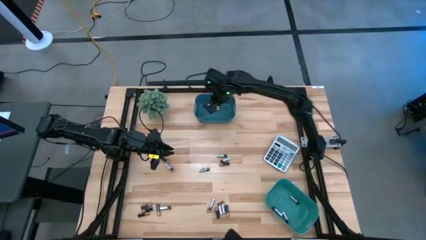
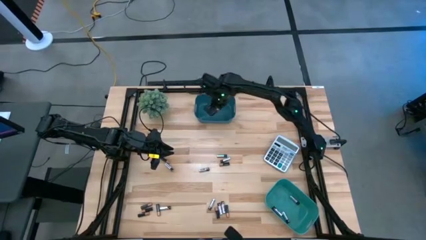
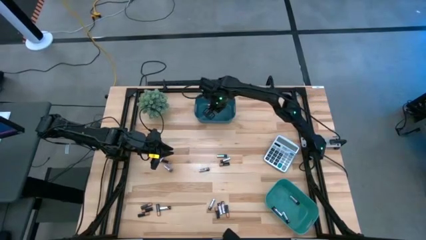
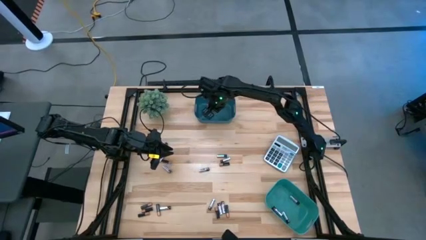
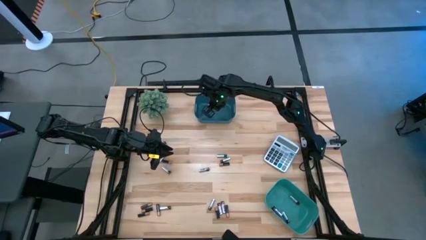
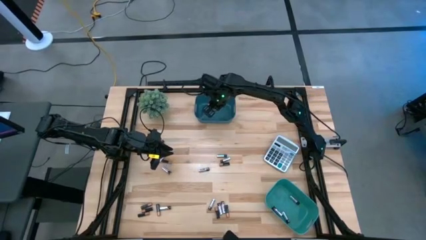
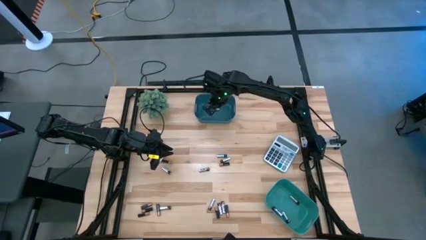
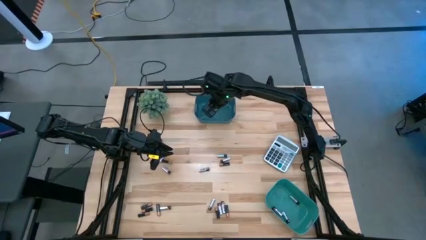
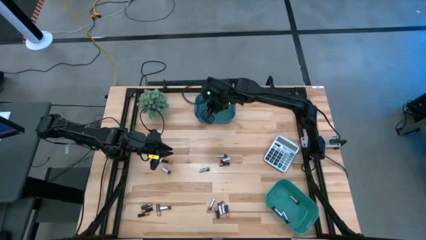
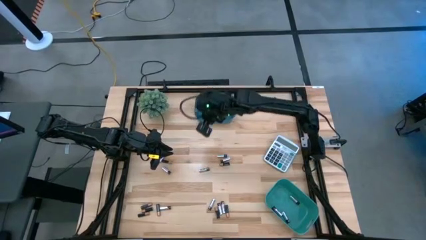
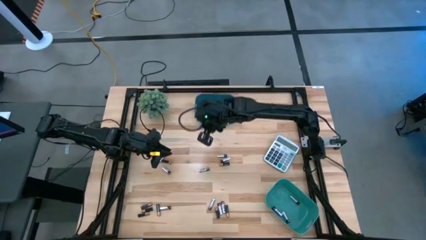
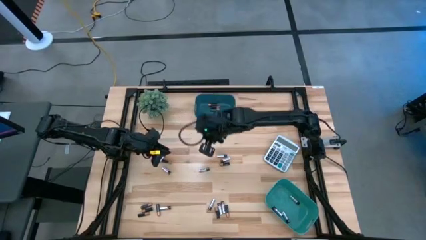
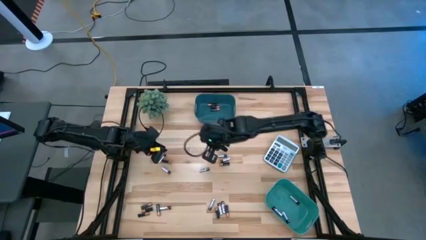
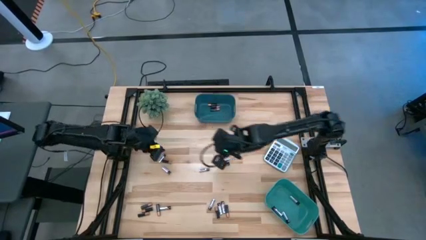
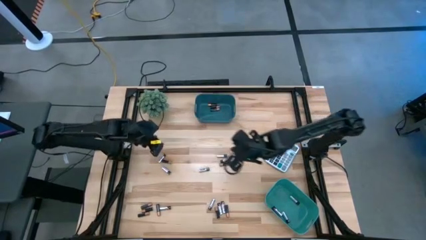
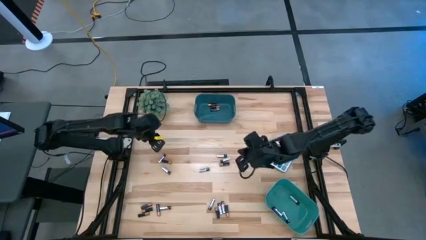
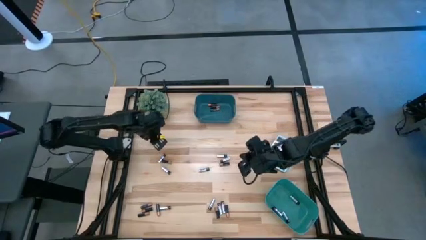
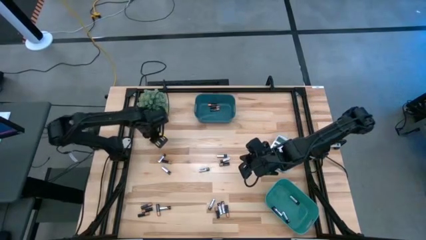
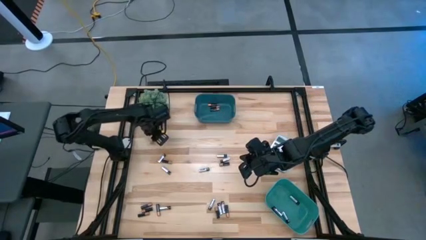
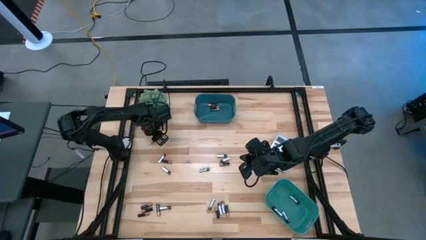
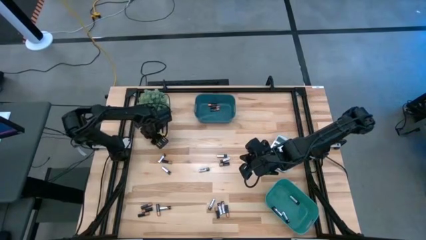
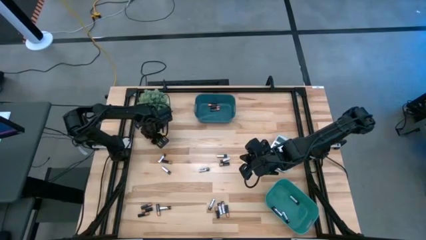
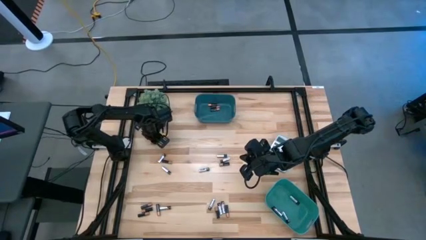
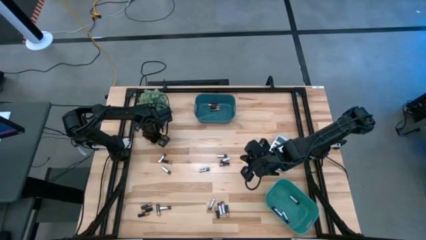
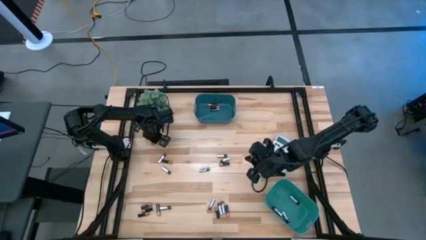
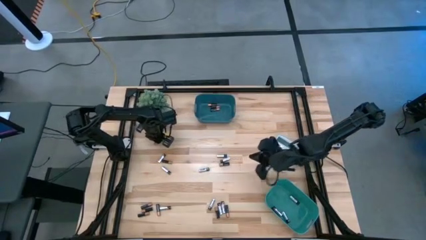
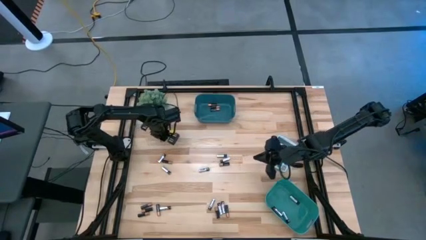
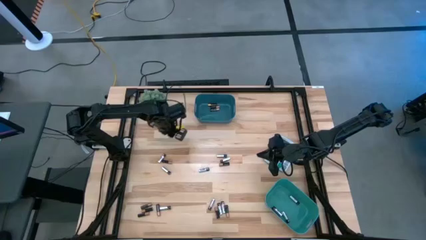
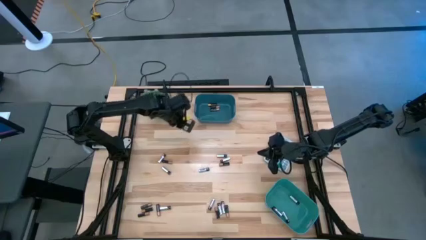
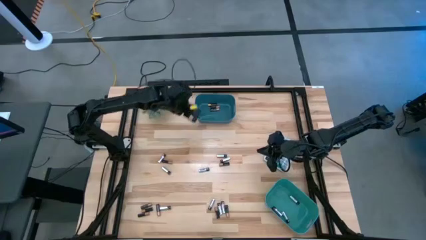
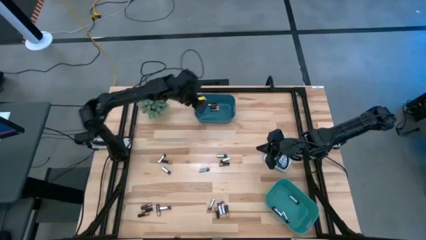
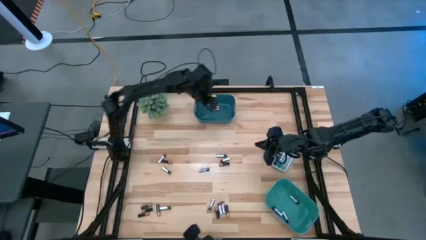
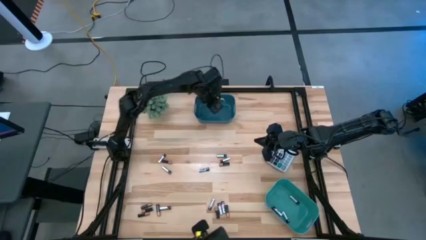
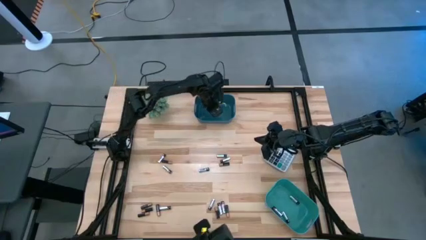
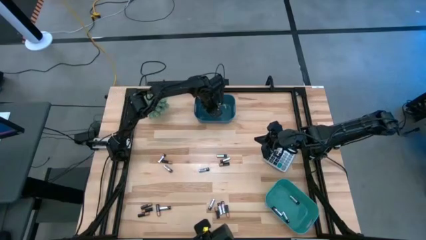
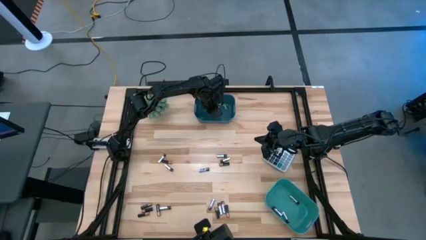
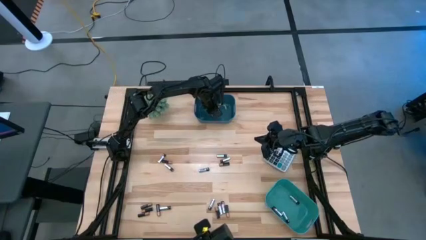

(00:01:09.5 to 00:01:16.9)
Task: Sort batteries
Put the black battery into the blue bin

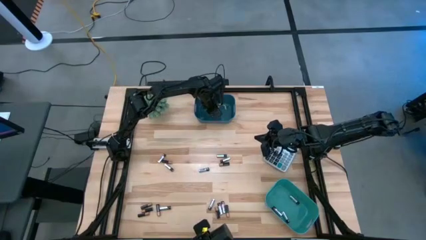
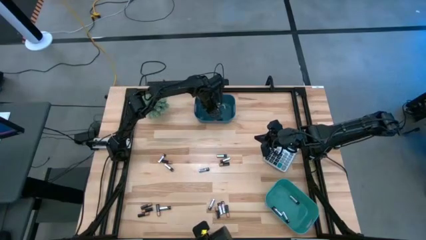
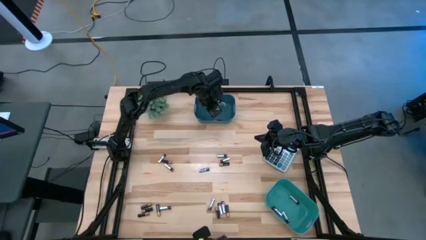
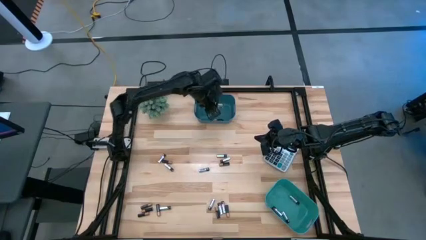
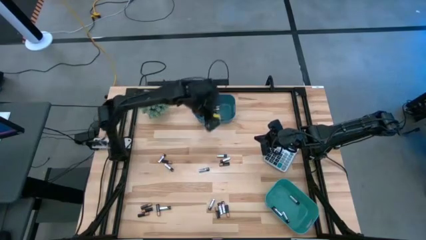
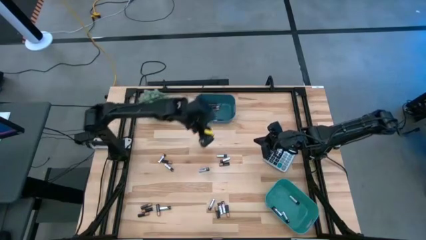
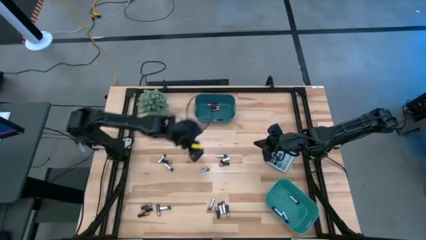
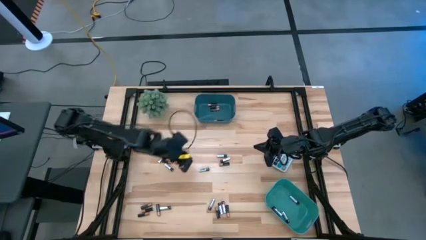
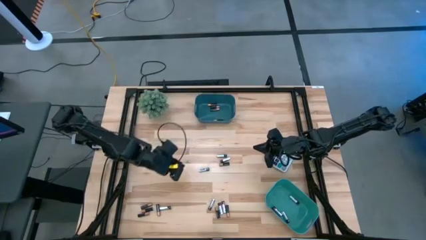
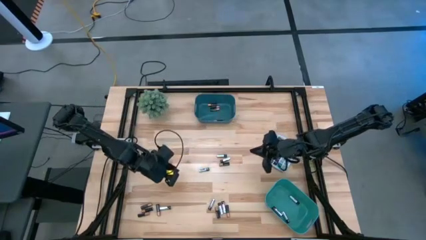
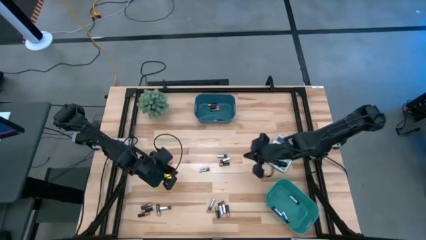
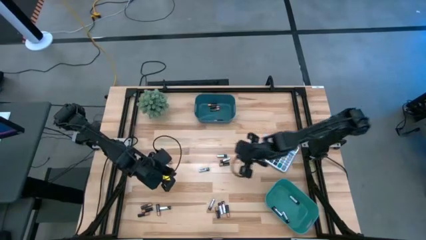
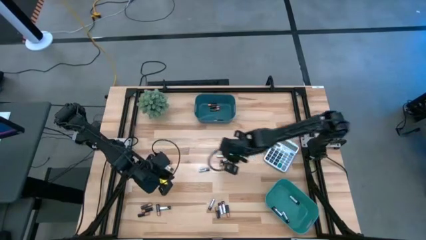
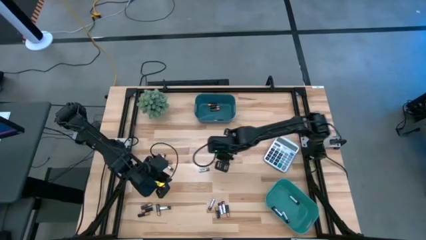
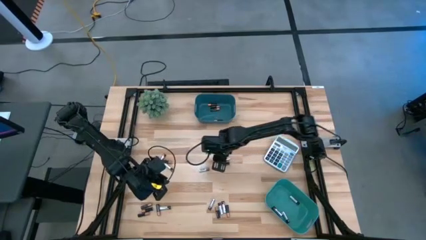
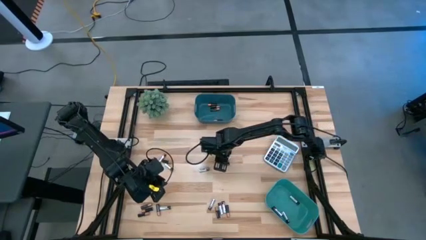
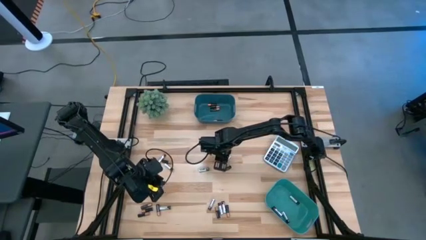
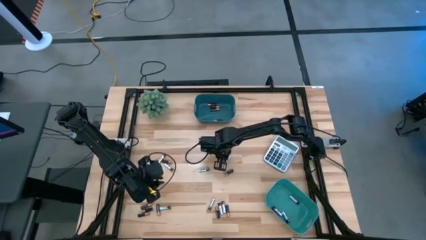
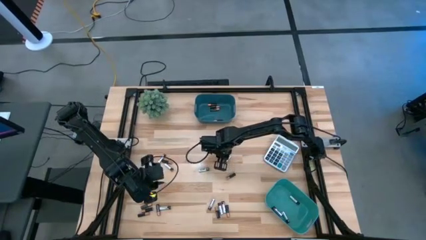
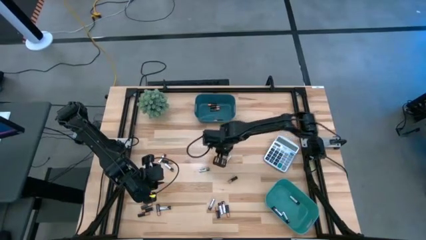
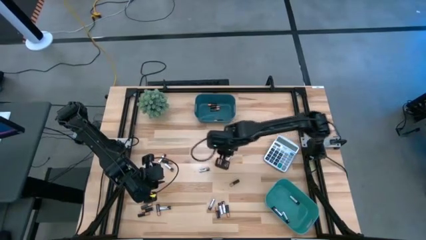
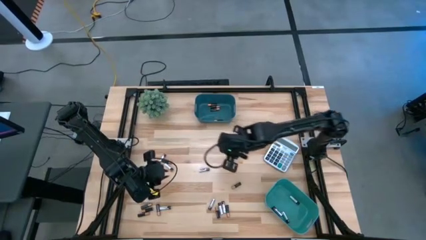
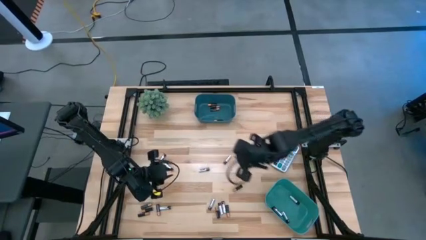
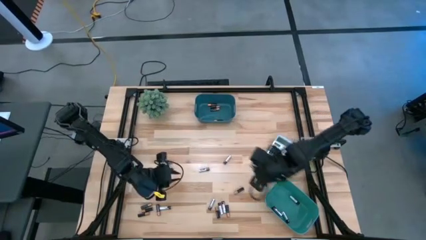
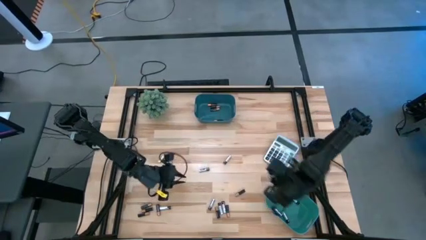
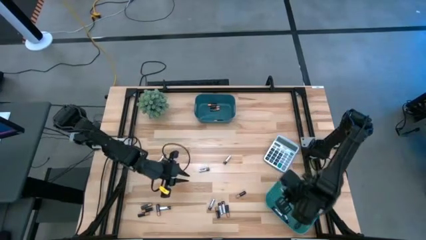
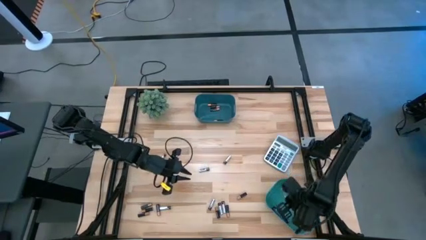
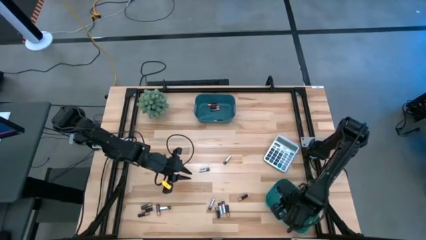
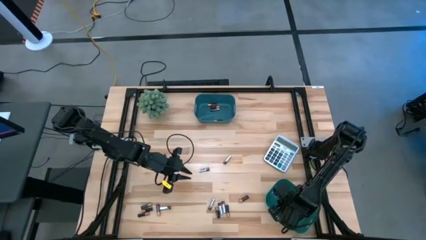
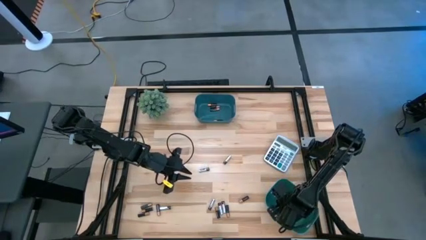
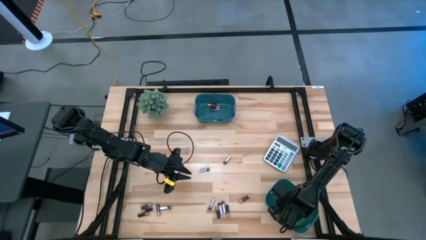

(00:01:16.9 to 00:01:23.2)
Put the silver battery into the green bin

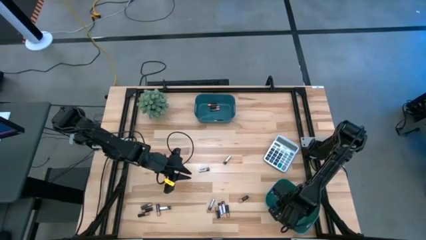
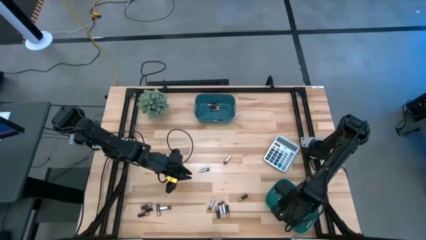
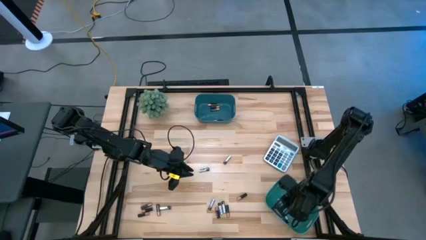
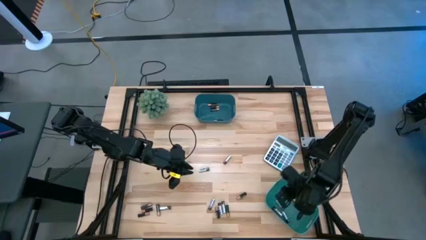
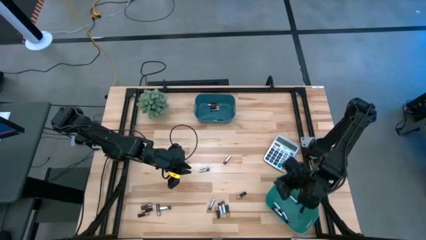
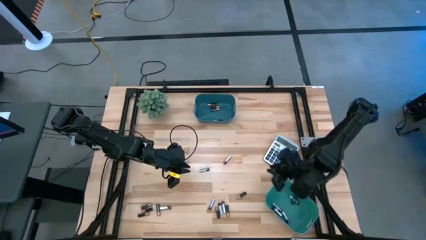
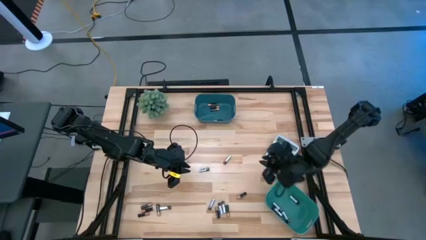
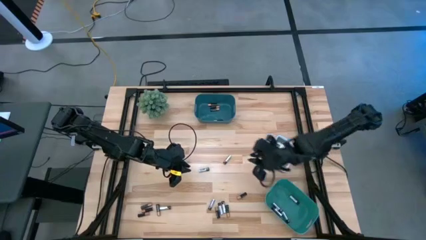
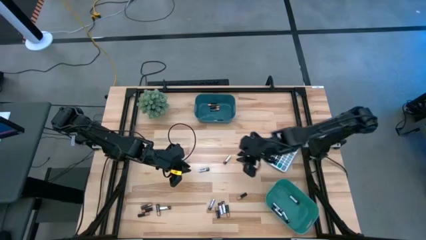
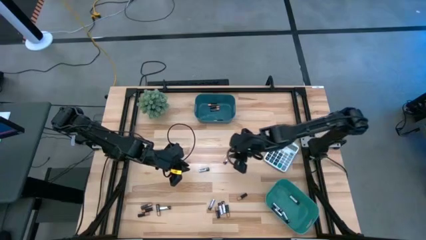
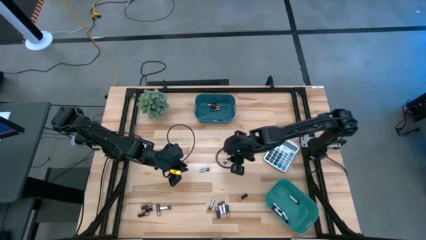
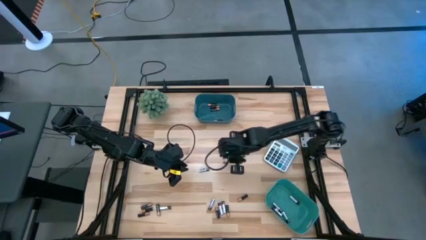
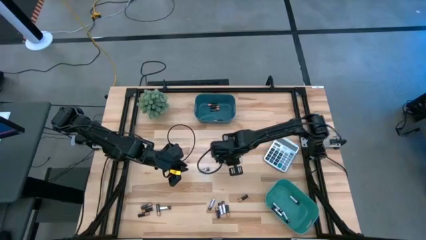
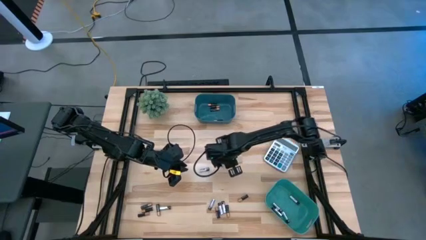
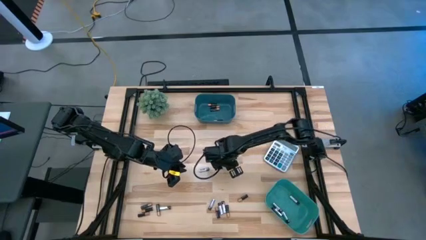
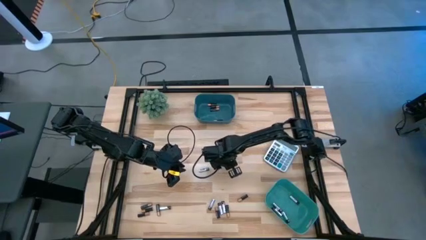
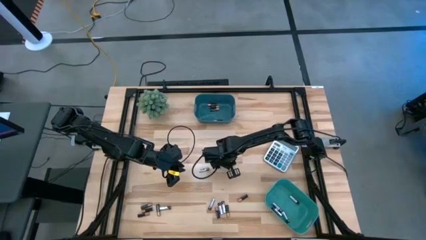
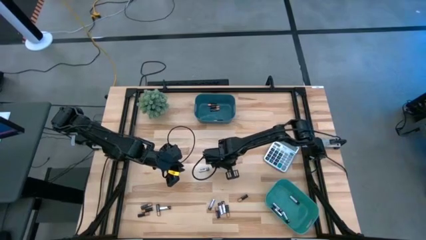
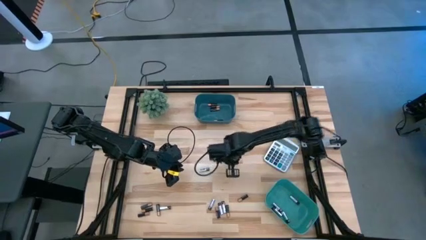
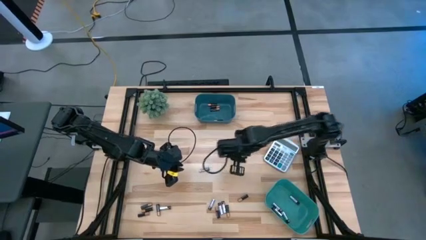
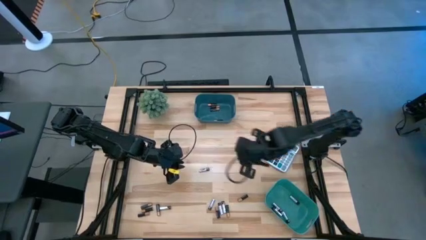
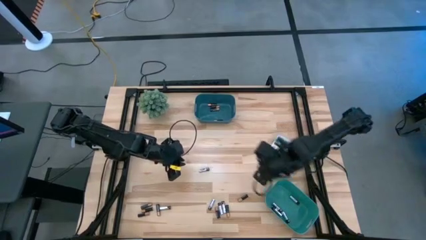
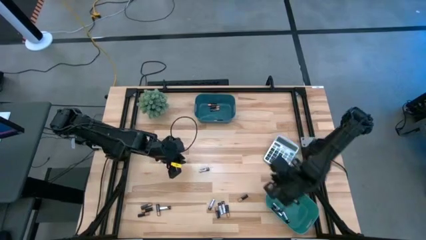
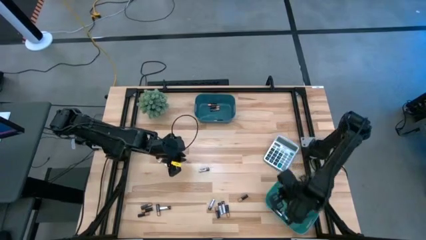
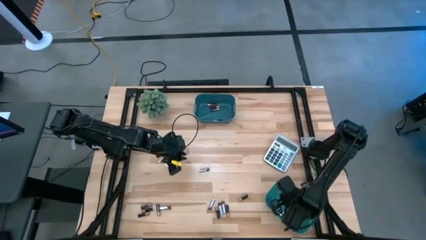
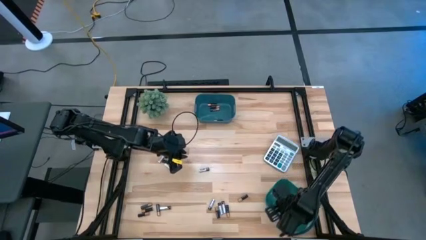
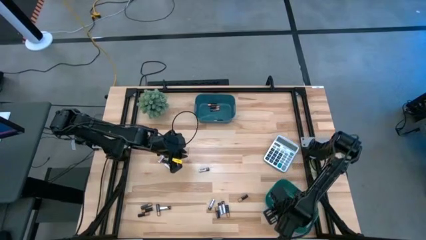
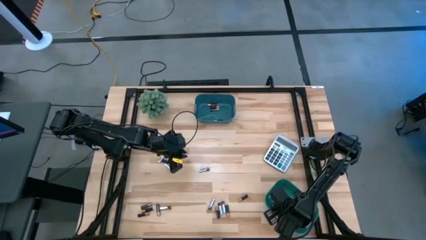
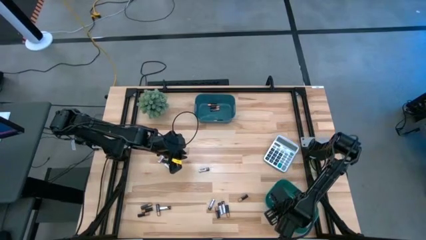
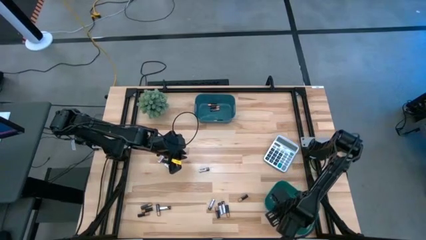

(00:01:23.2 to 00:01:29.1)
Put the silver battery into the green bin
